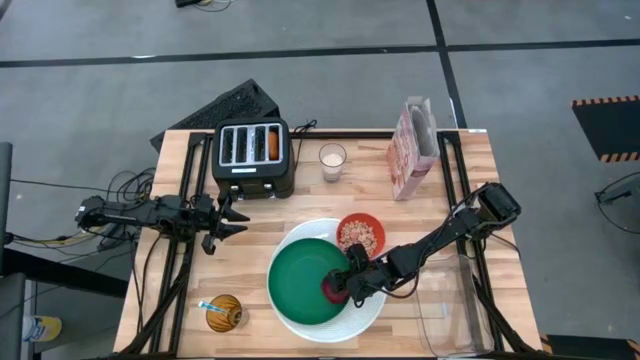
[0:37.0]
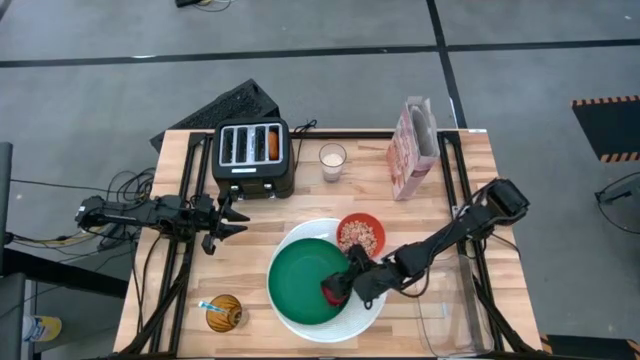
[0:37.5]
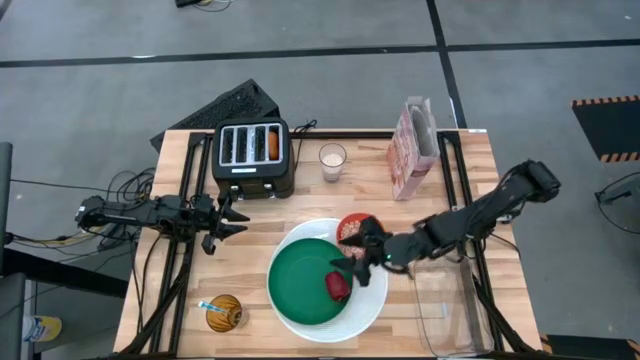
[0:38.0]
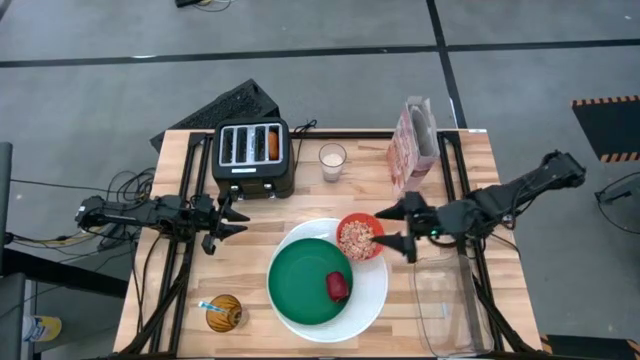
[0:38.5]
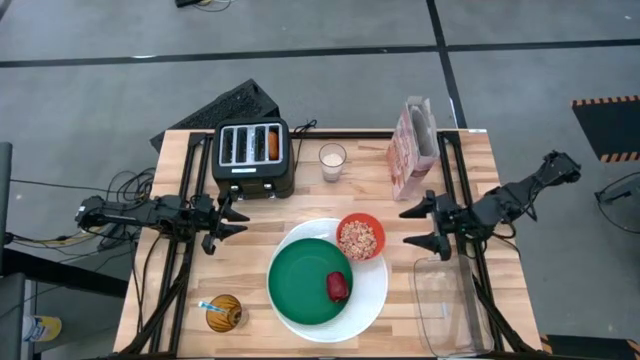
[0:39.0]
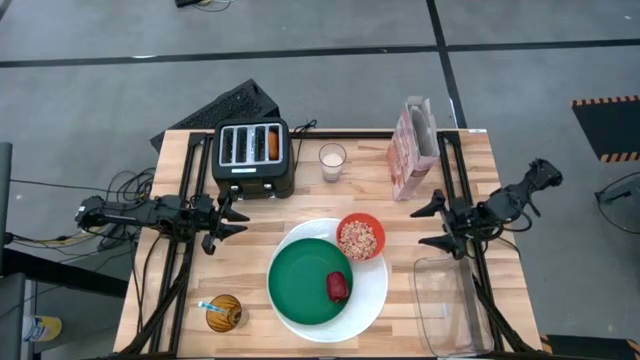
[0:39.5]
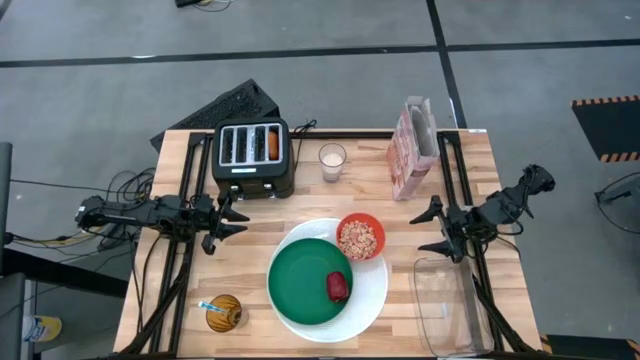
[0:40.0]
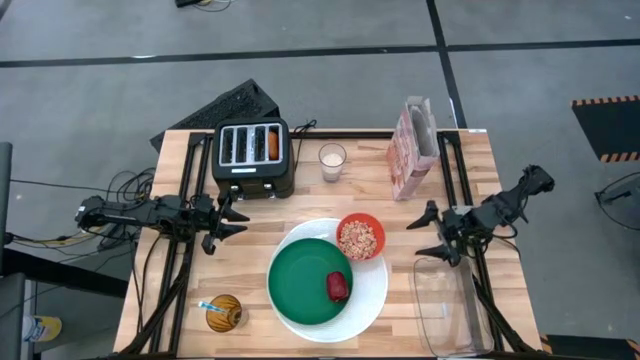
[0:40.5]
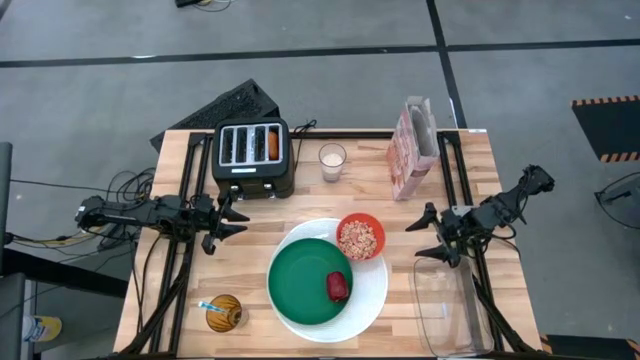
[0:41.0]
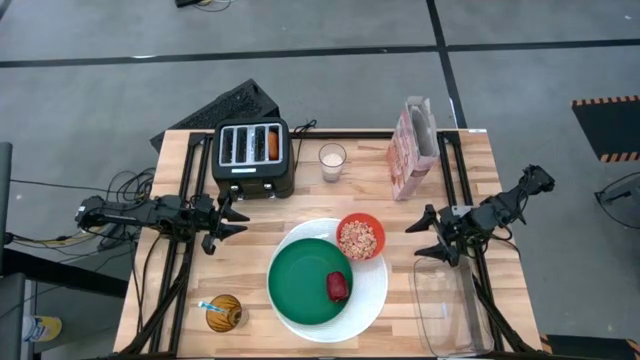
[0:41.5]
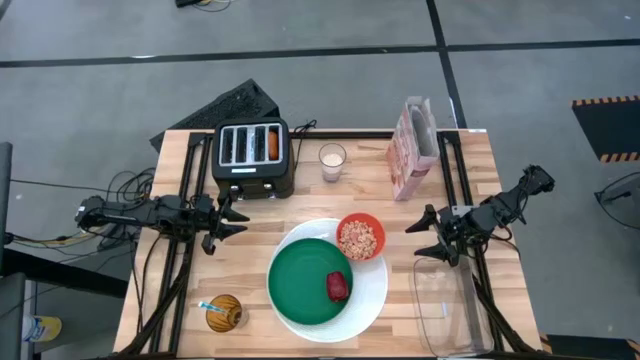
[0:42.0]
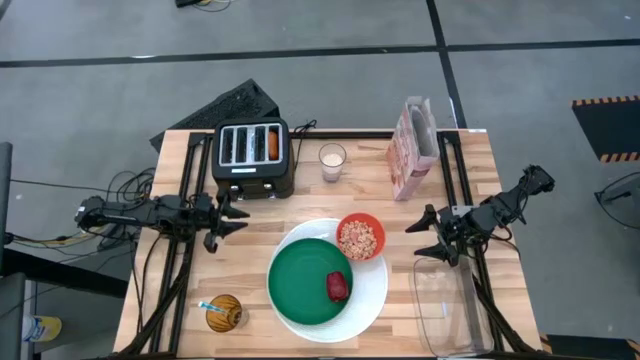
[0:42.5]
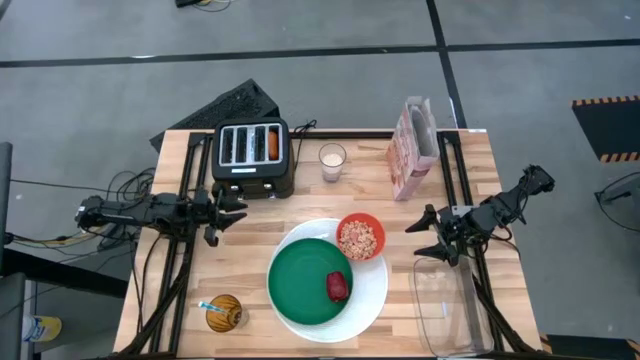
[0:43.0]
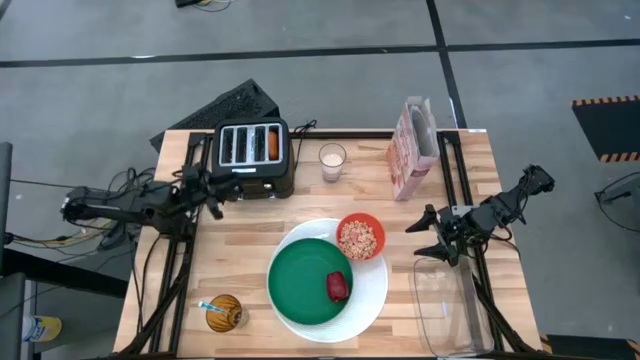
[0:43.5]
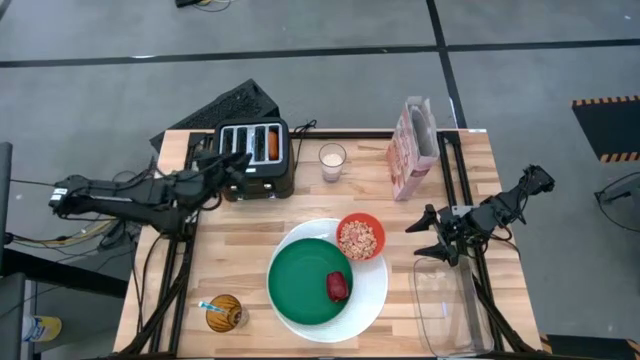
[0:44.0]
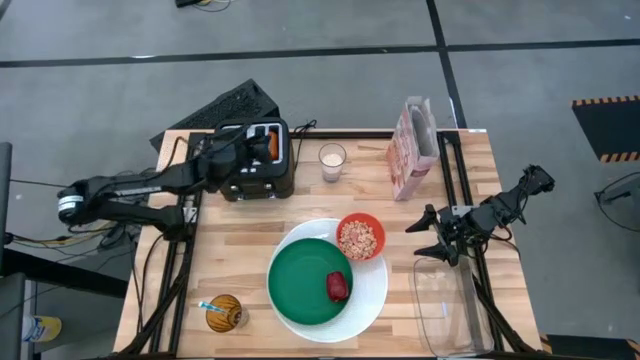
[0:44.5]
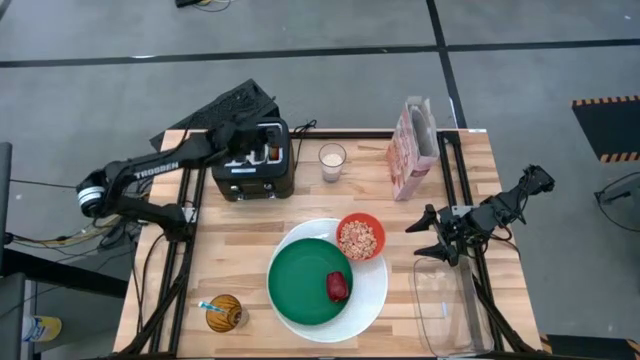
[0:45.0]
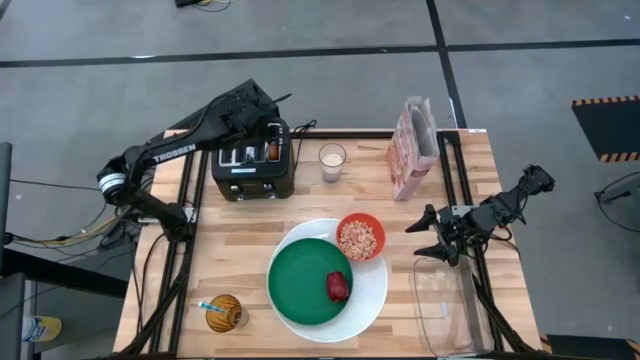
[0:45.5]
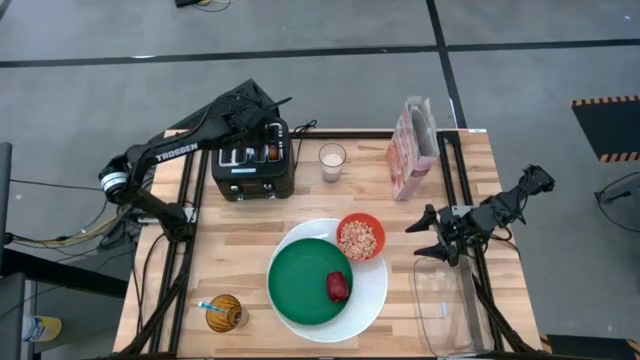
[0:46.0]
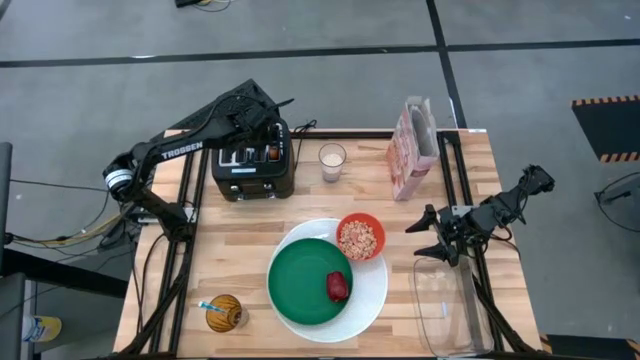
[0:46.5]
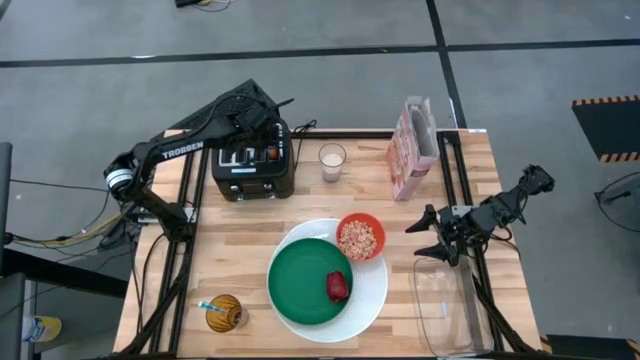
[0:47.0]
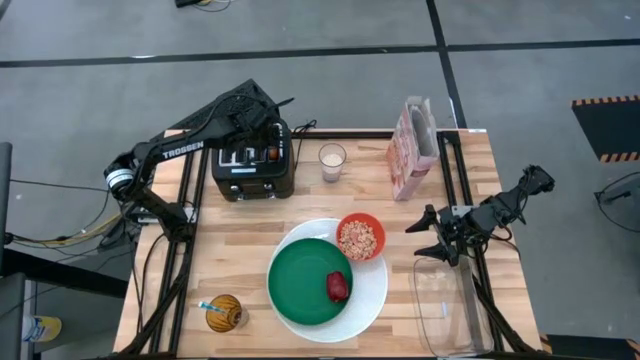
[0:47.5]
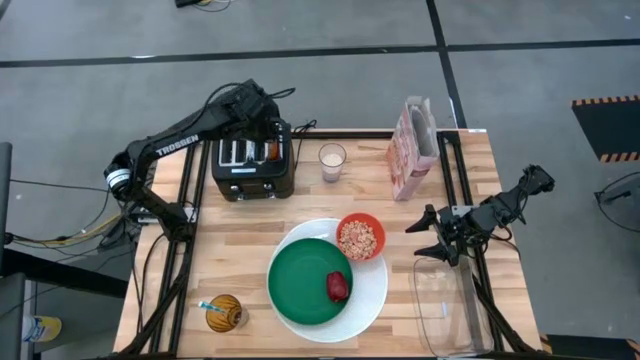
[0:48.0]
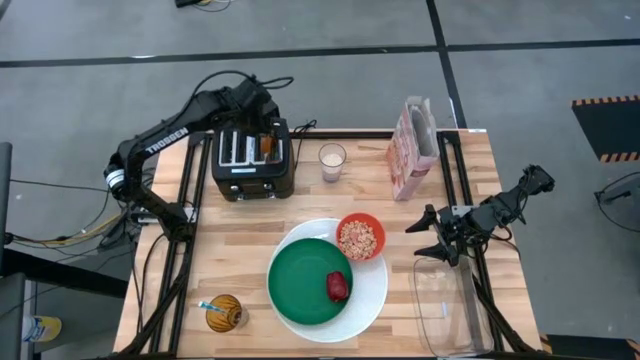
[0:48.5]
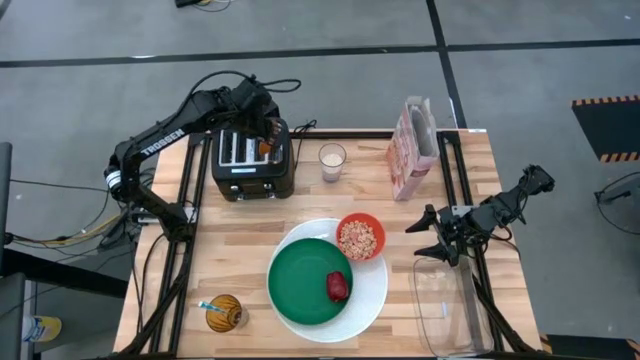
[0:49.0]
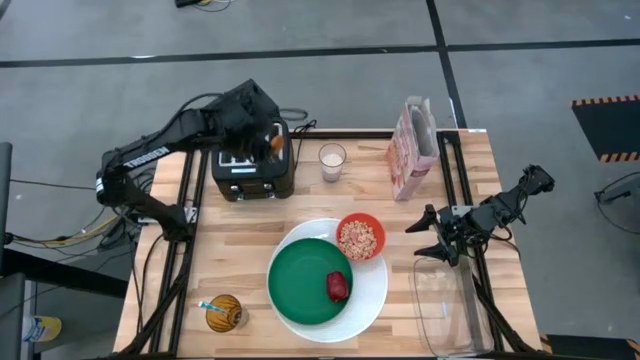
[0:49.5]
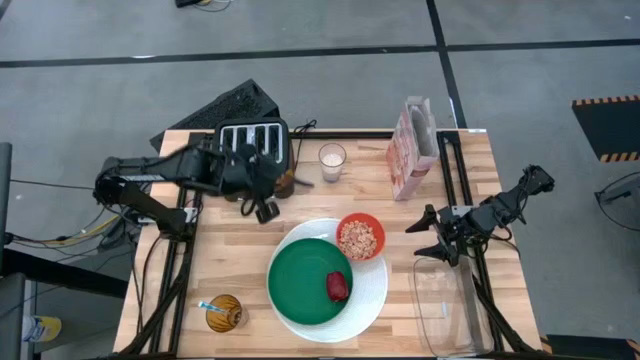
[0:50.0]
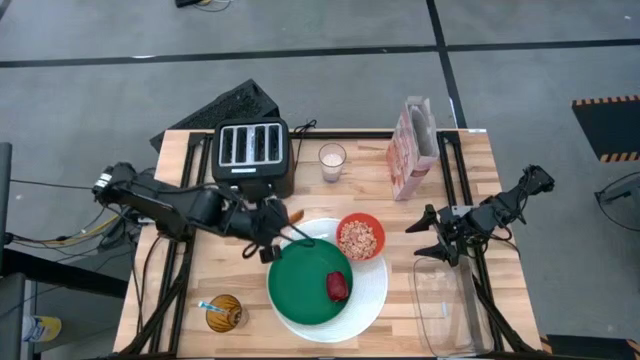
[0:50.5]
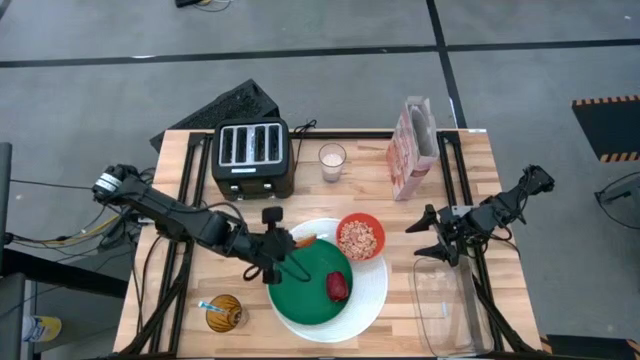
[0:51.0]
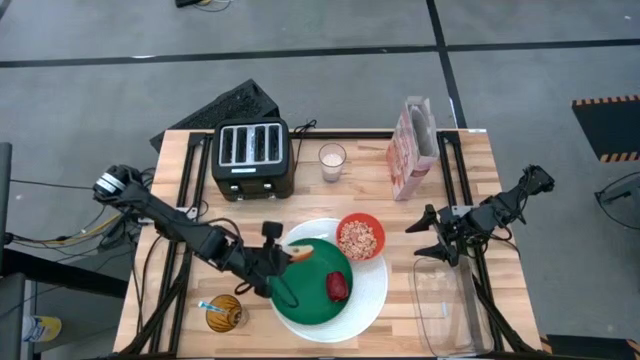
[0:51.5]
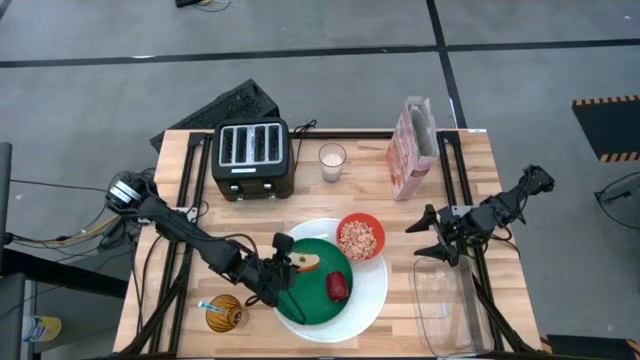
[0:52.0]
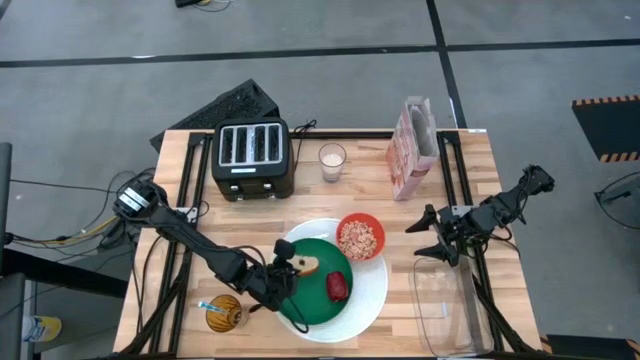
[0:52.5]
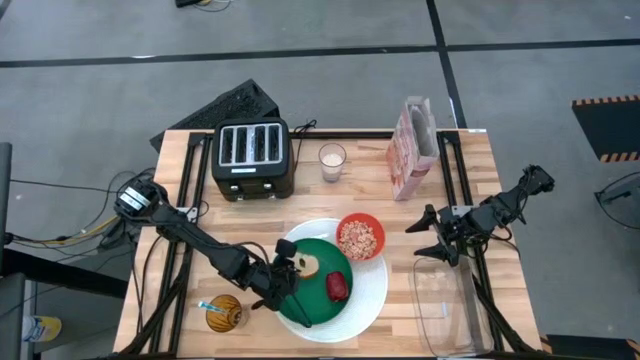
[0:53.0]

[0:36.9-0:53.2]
Task: Arrange a breakfast setting
Put the toasted bread into the plate

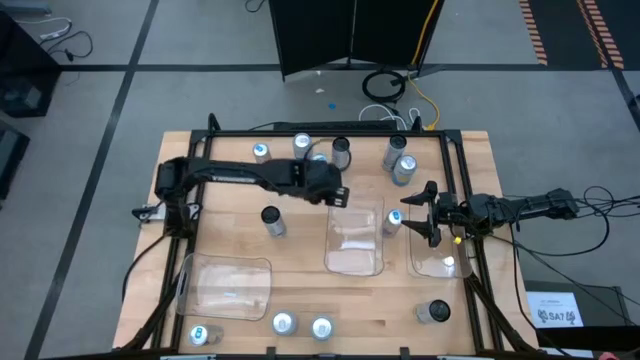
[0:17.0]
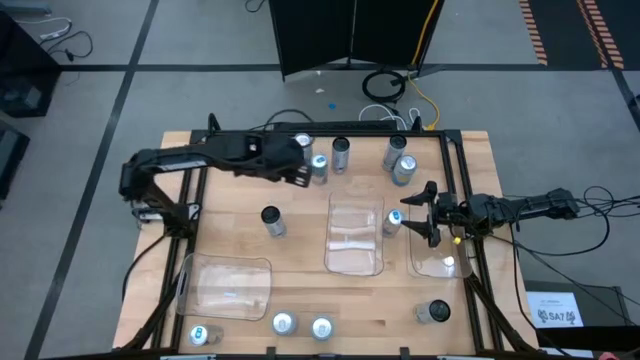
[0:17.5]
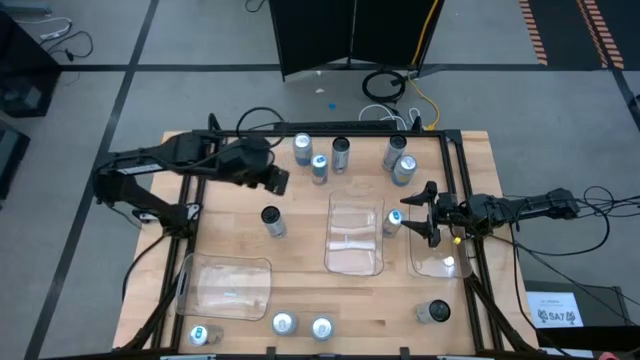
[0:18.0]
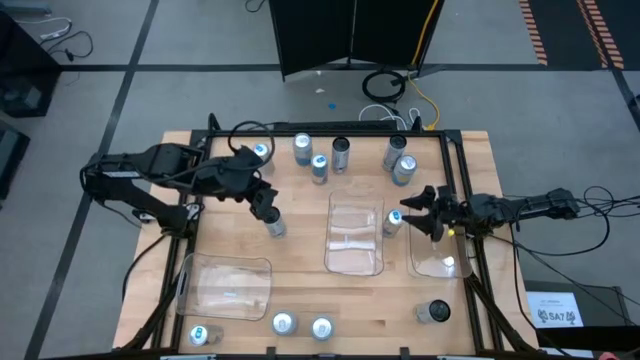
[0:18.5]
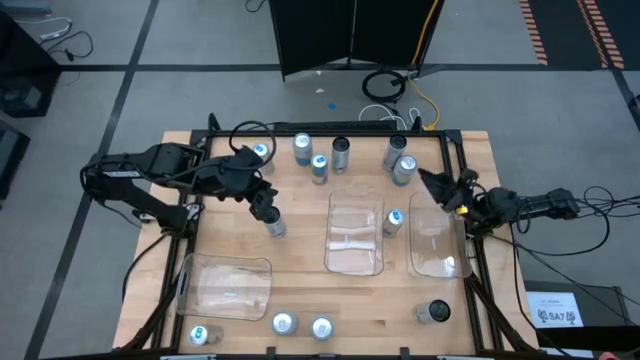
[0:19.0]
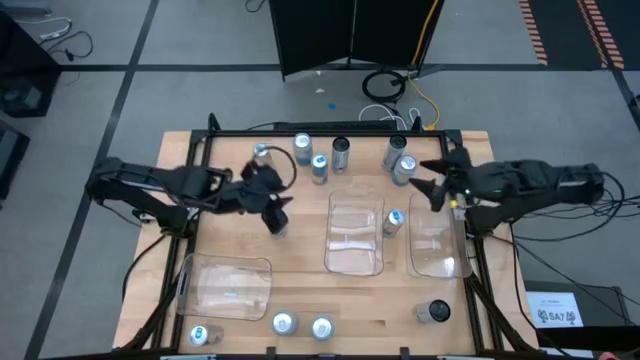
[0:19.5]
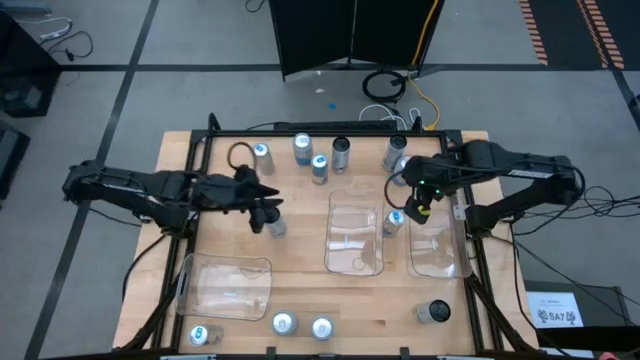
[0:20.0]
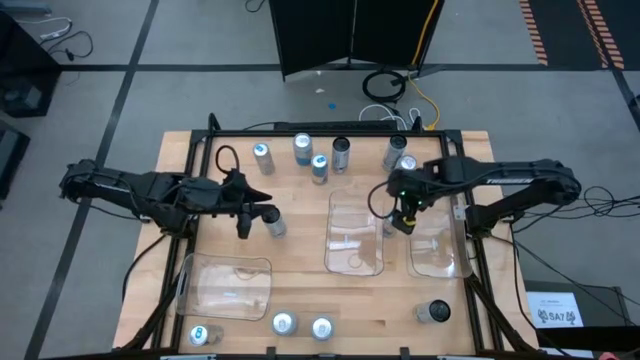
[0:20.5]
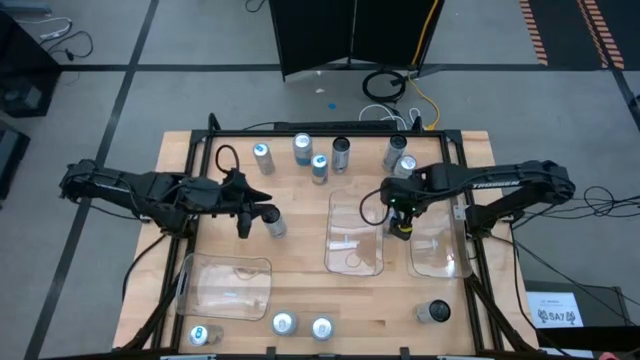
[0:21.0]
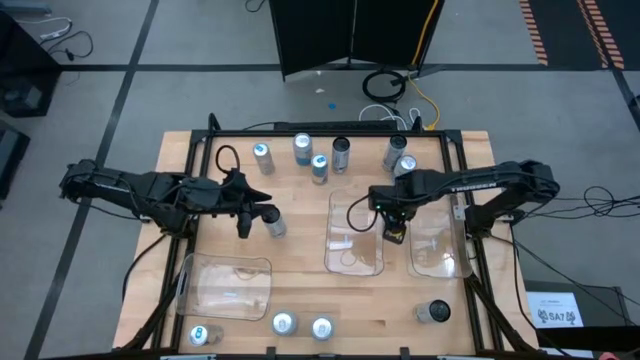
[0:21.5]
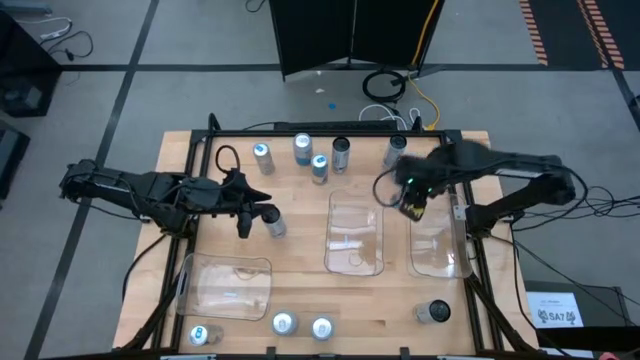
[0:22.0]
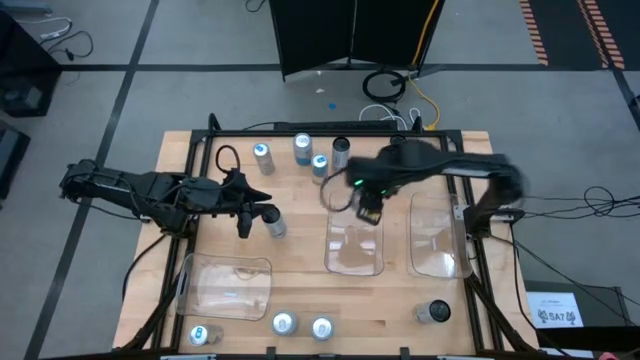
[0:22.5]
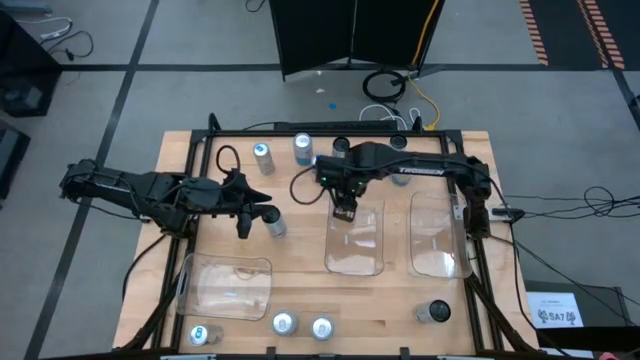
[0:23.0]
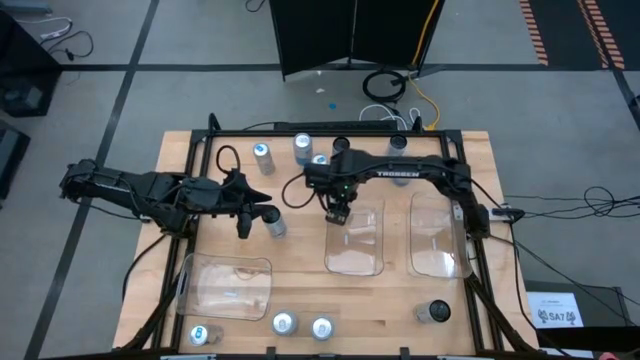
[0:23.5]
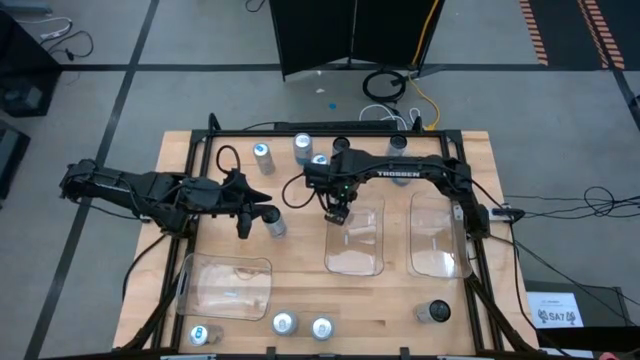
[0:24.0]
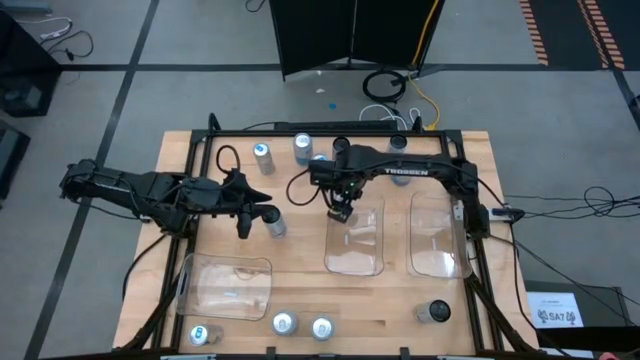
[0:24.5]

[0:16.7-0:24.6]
Task: Sort soda cans
Put the middle right blue soda can into the middle transparent bin
